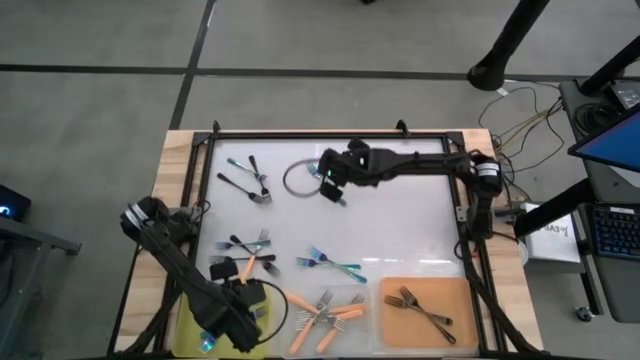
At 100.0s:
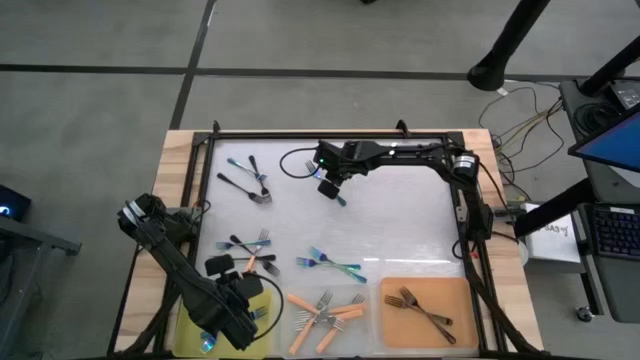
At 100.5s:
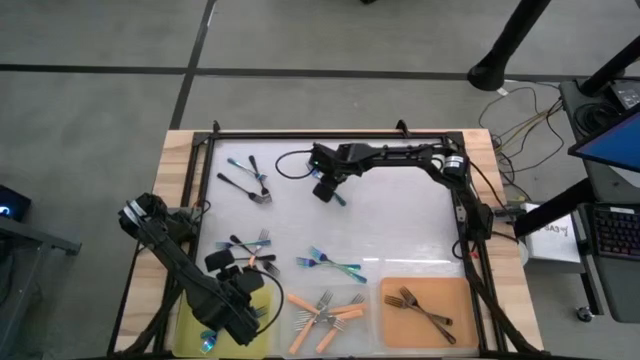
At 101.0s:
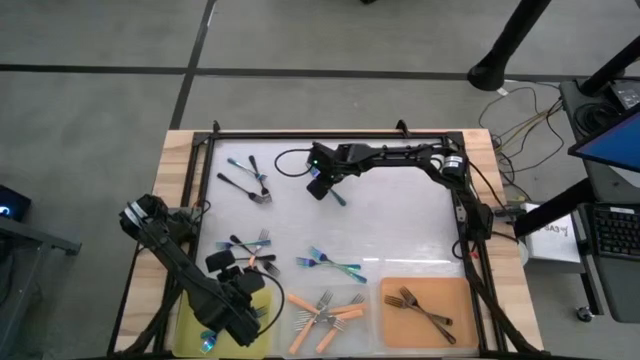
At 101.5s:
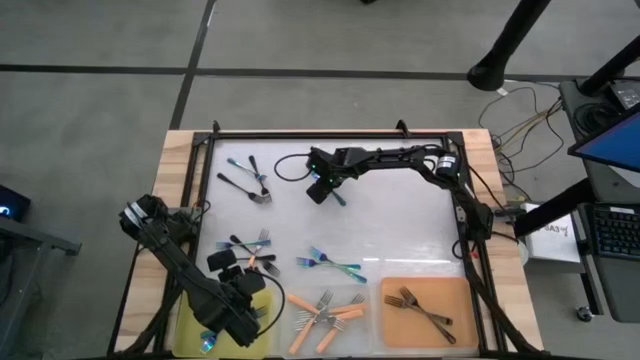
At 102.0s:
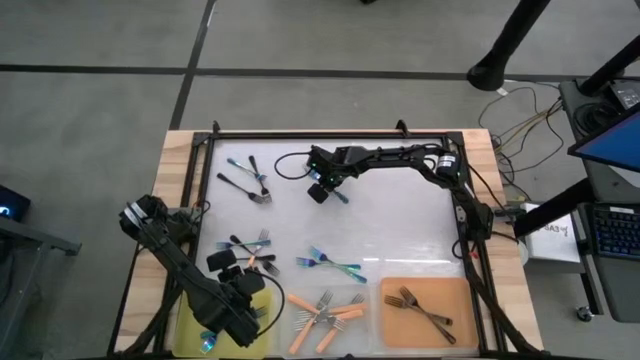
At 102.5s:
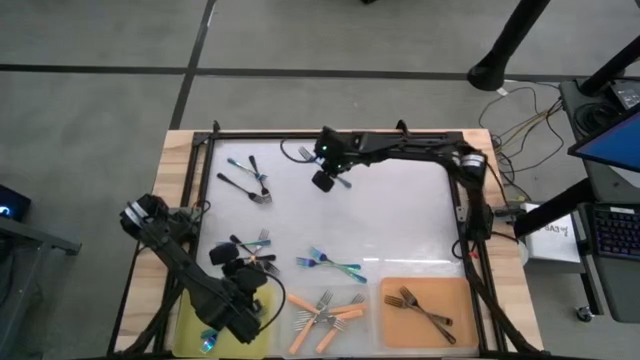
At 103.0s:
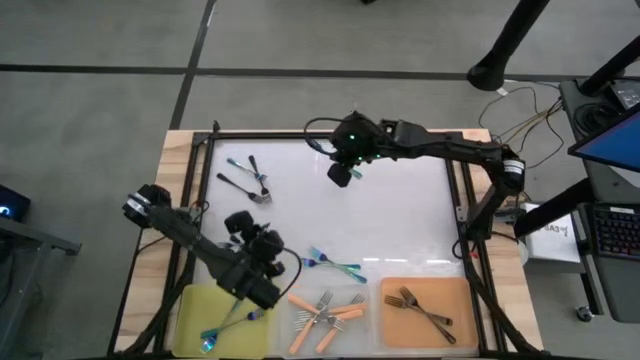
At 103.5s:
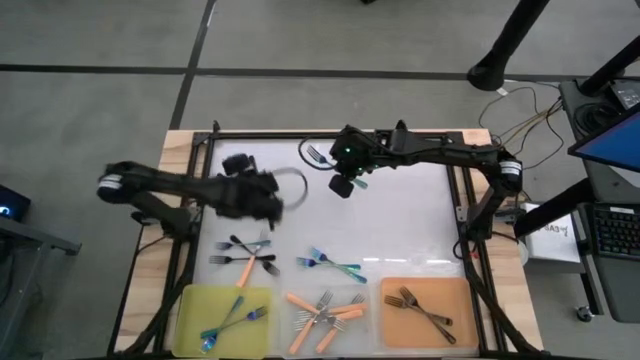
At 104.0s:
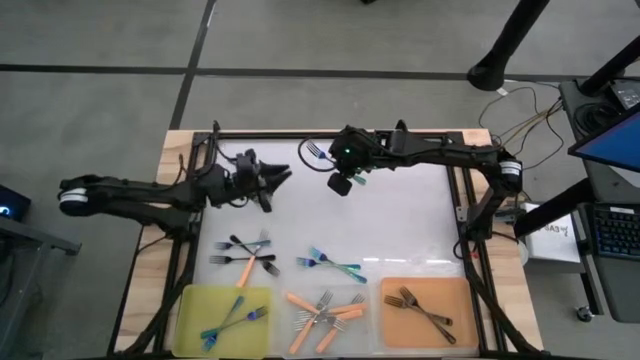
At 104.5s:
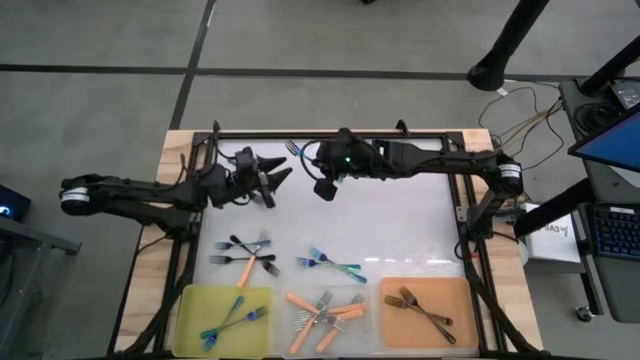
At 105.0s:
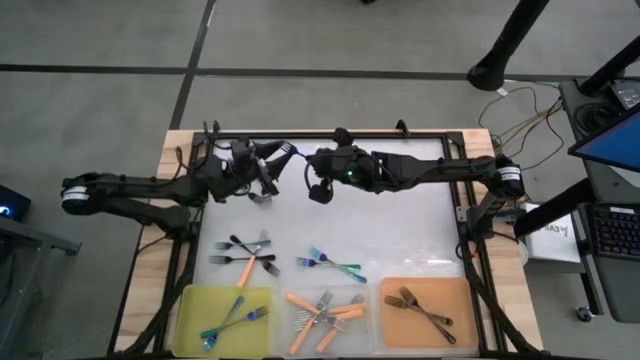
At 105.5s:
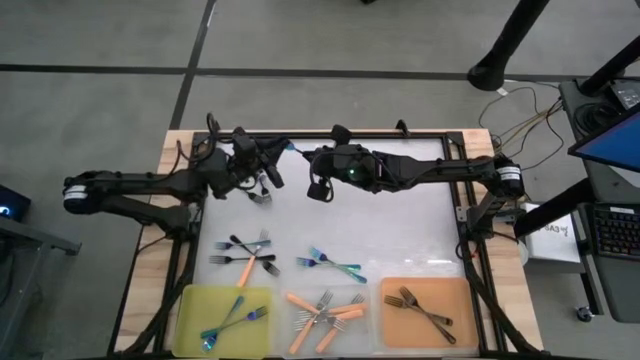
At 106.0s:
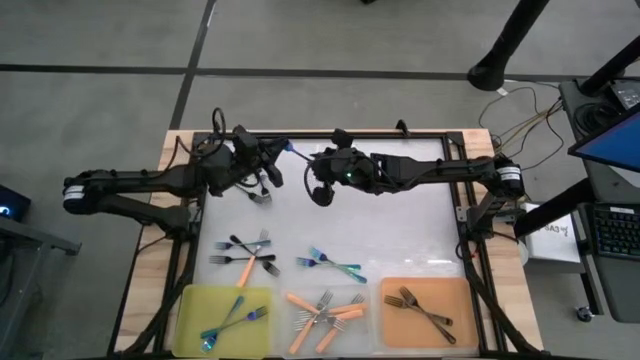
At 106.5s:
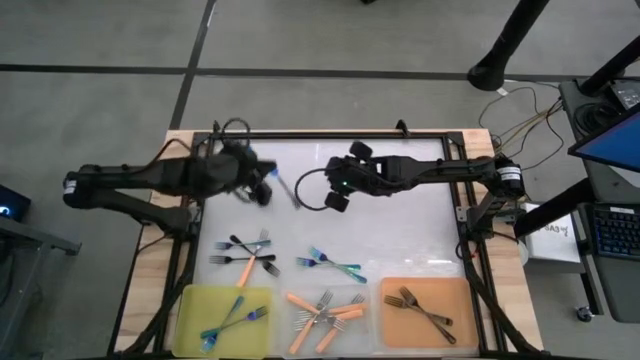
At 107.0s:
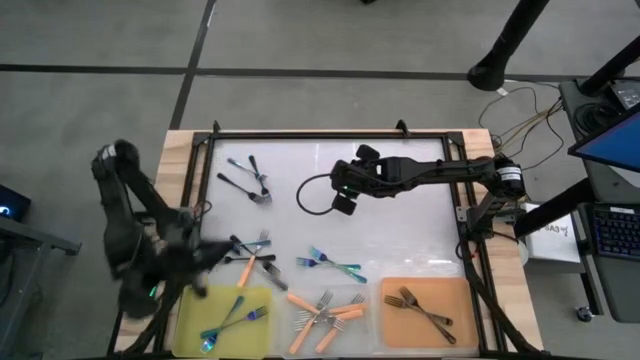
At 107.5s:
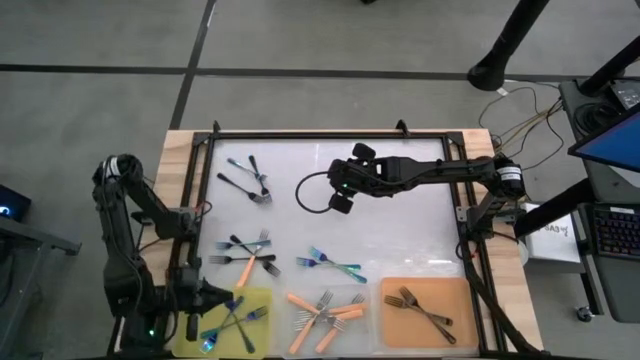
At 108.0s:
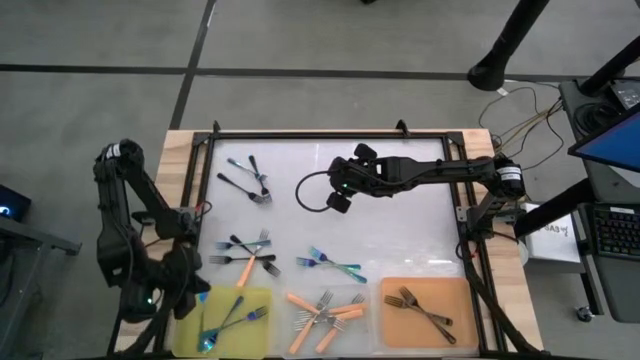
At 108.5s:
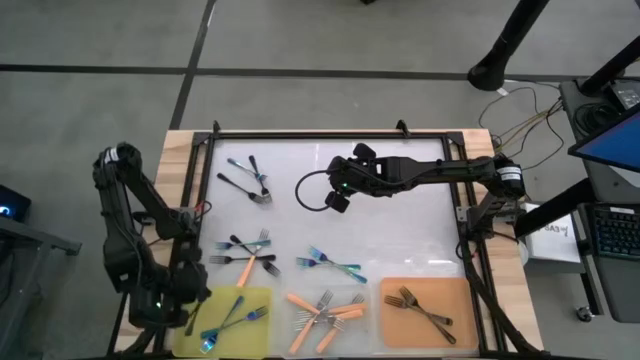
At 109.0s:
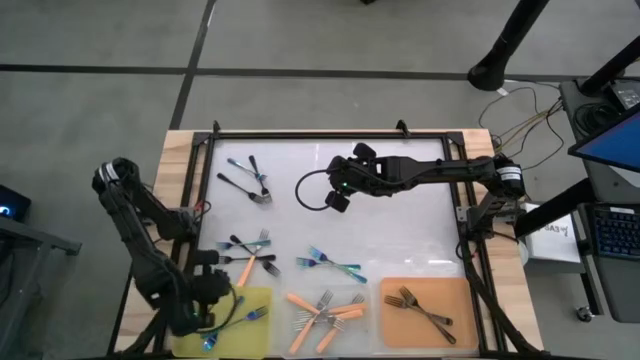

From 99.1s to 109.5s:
Task: Sort silverware by color (type)
Put the blue fork into the yellow bin

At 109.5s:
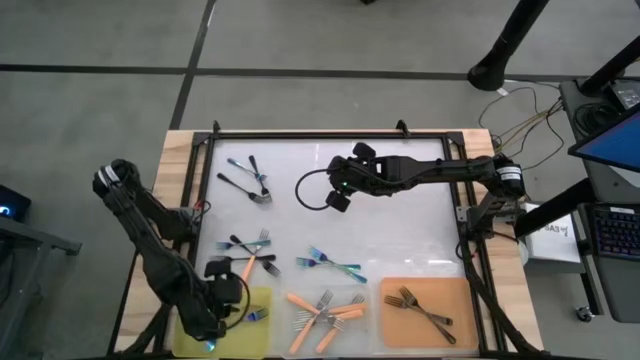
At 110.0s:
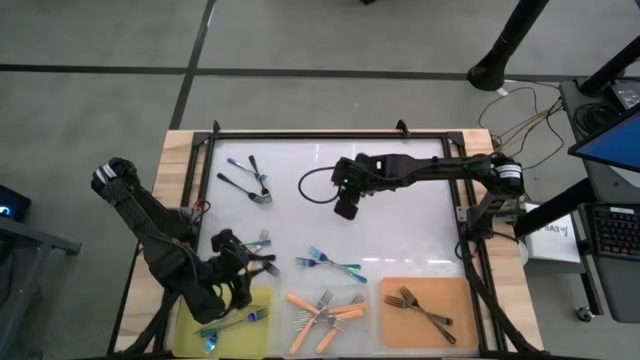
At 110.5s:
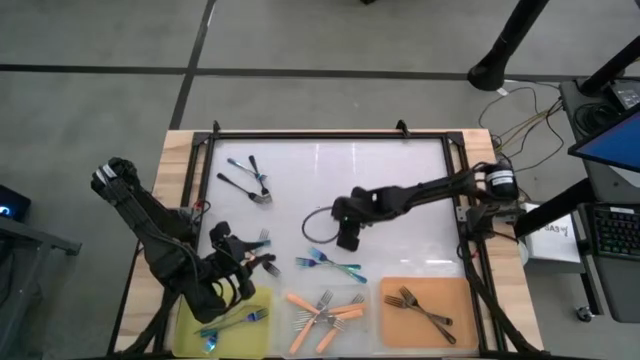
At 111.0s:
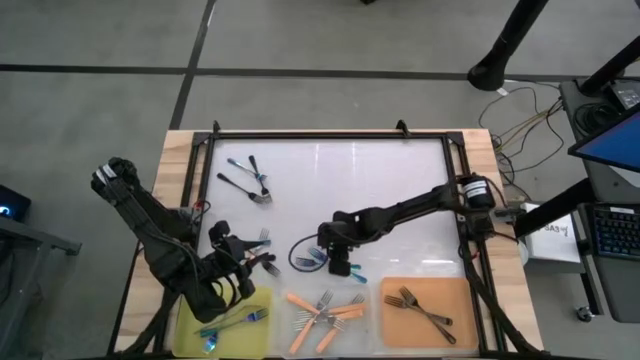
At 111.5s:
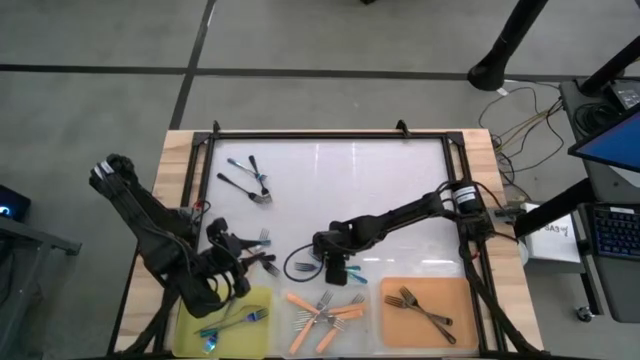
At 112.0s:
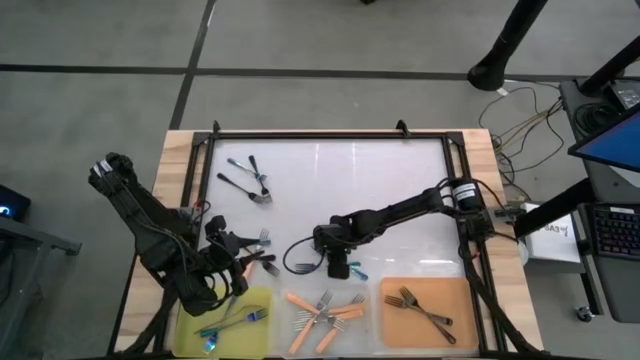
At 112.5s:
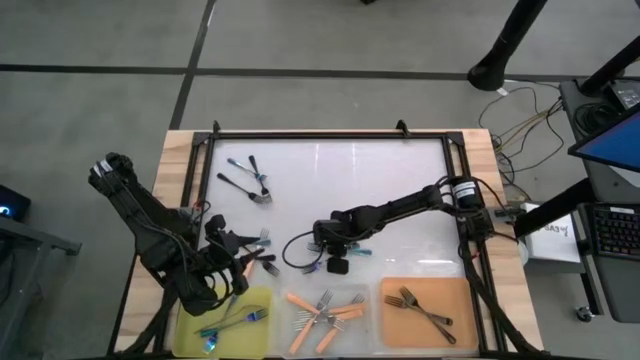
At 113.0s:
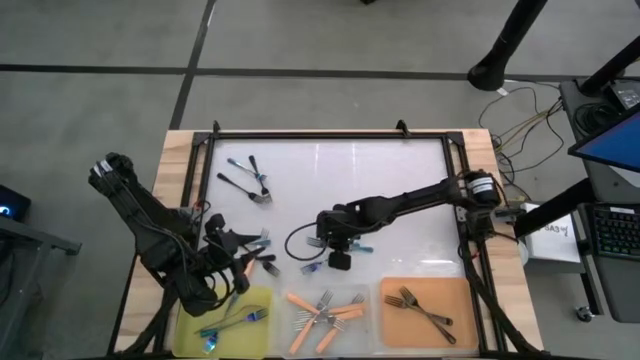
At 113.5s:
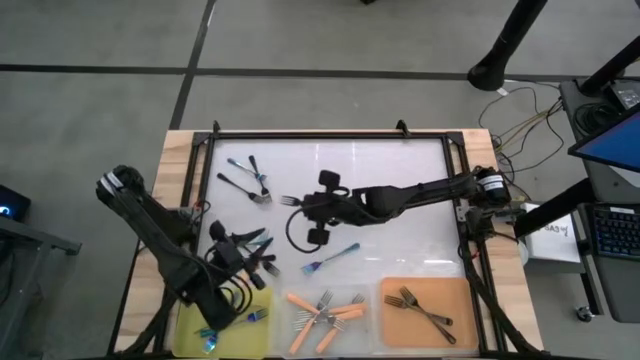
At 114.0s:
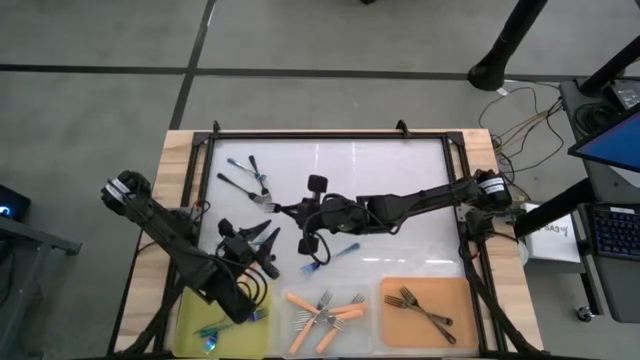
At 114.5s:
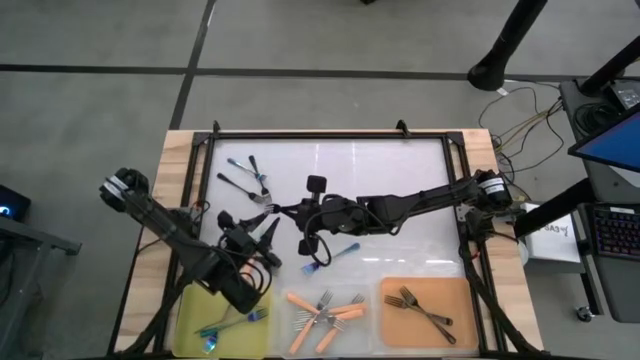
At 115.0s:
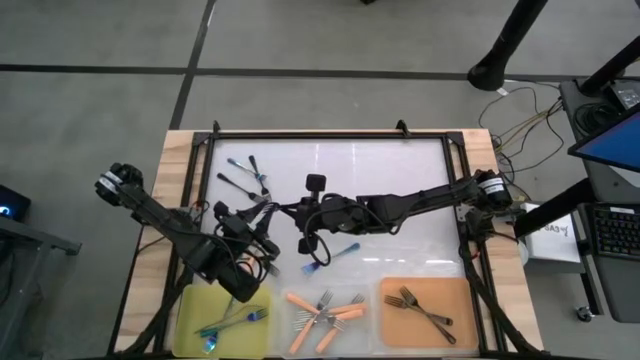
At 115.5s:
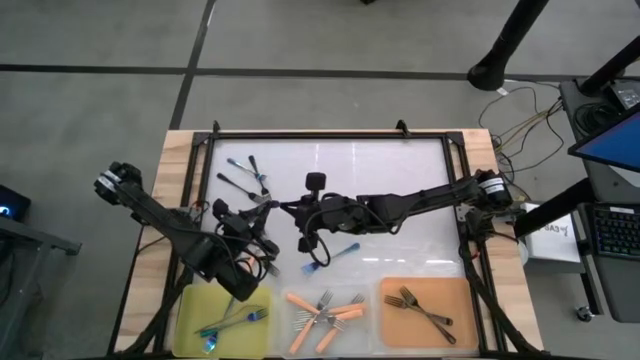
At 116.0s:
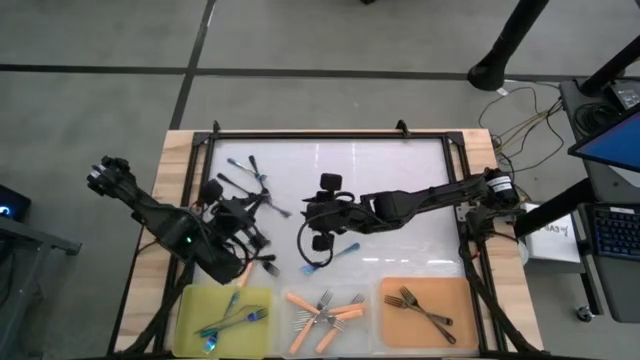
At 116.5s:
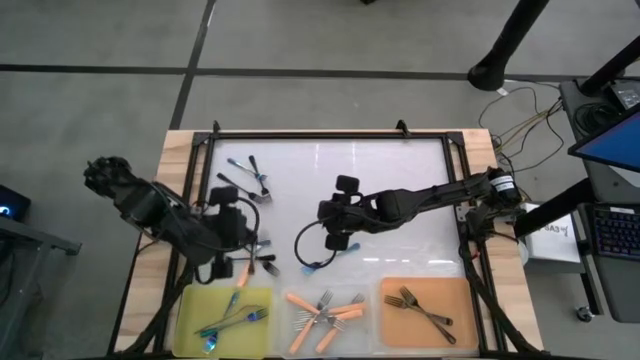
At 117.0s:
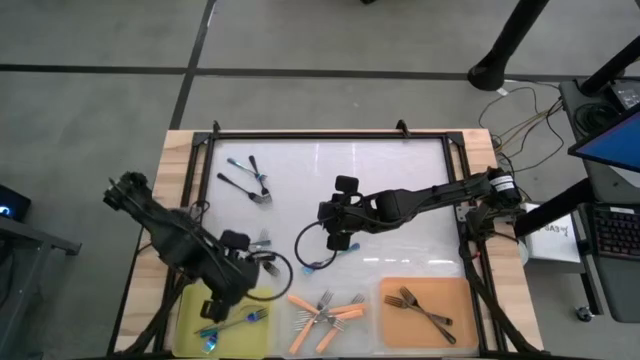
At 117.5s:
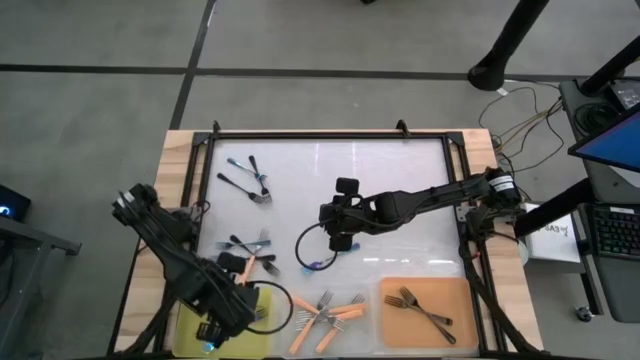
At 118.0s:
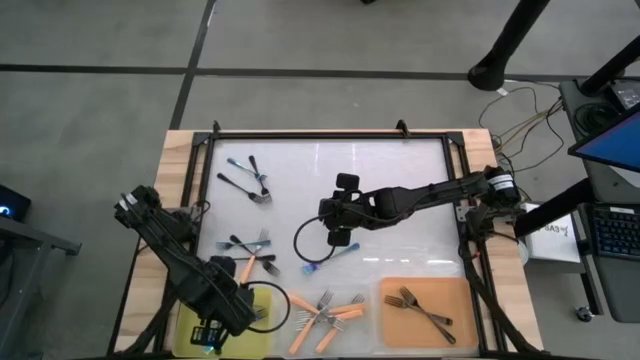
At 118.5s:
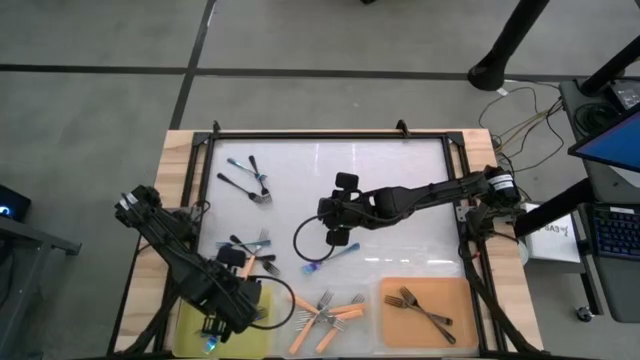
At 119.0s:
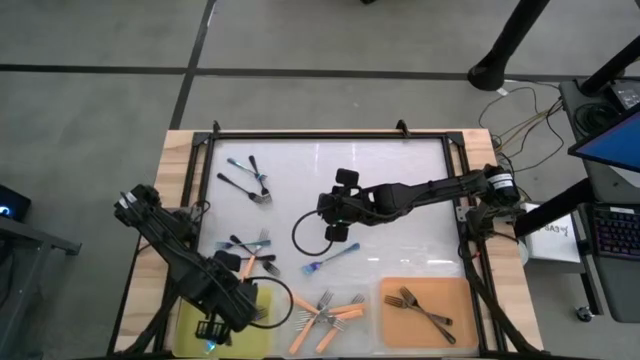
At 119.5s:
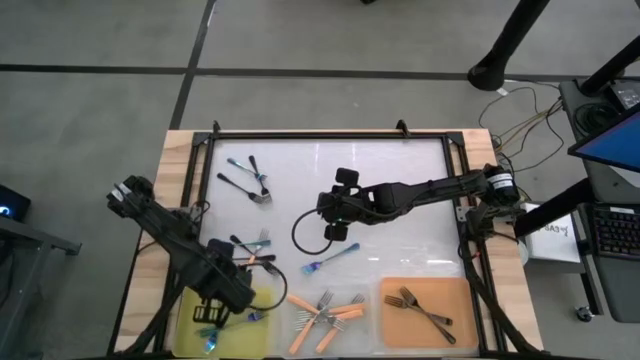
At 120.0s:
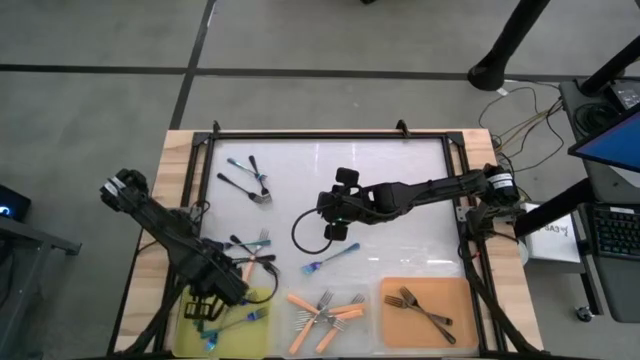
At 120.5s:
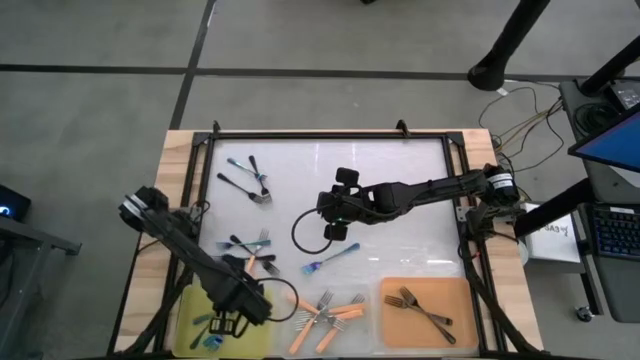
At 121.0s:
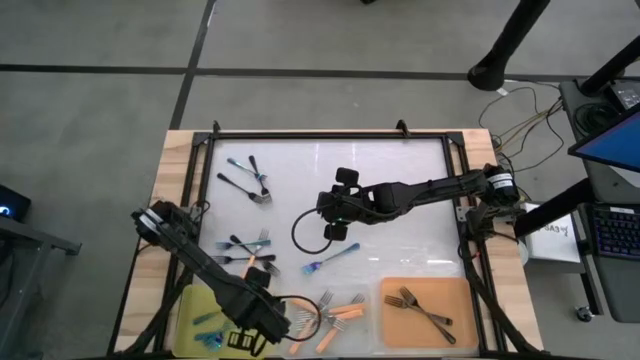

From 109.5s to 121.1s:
Put the blue fork into the yellow bin
